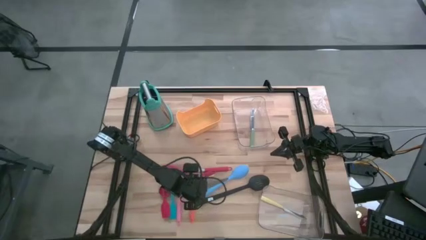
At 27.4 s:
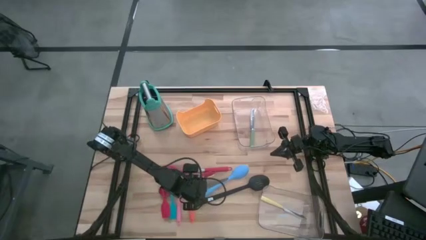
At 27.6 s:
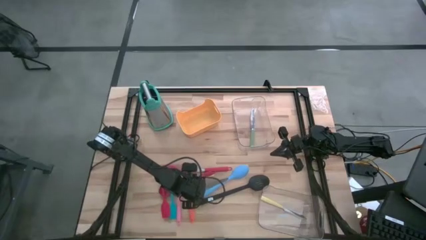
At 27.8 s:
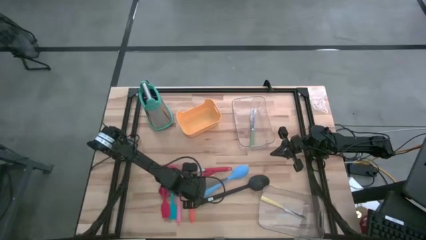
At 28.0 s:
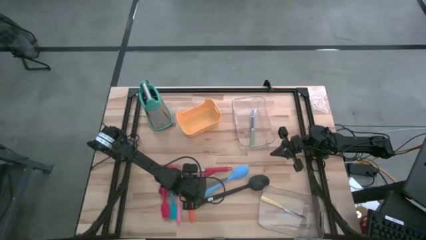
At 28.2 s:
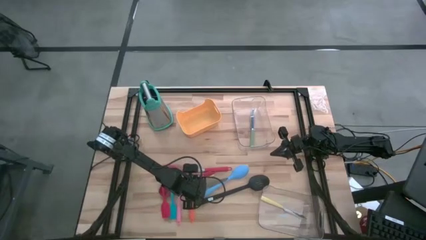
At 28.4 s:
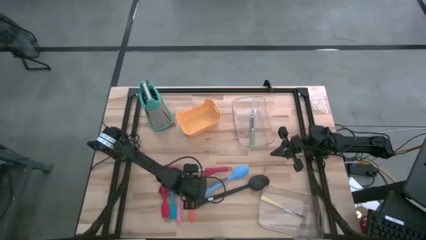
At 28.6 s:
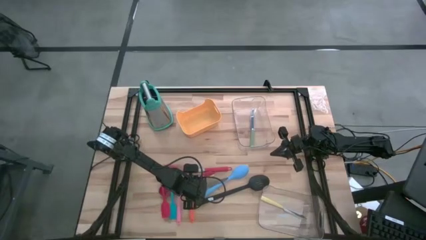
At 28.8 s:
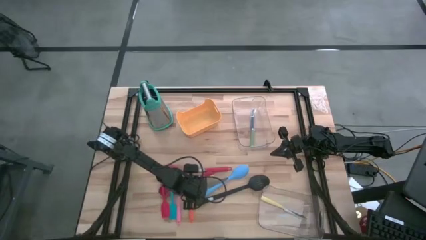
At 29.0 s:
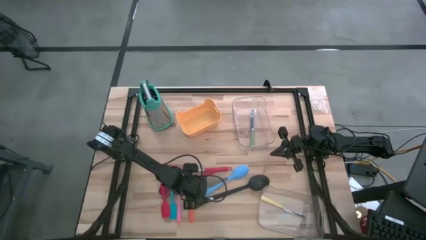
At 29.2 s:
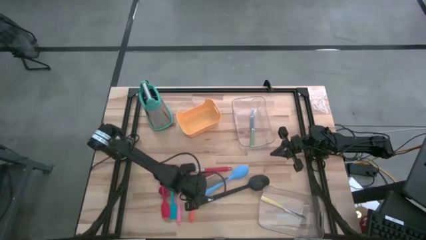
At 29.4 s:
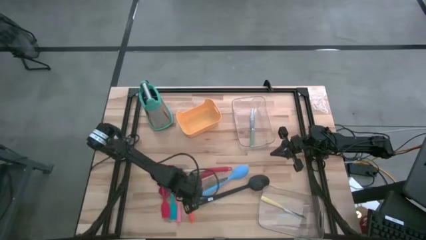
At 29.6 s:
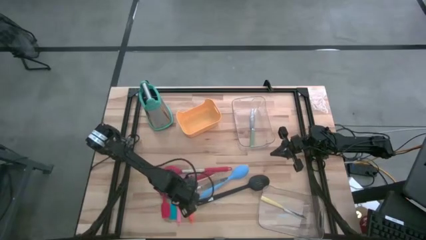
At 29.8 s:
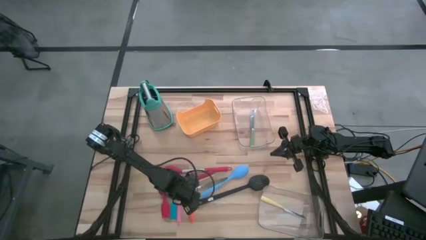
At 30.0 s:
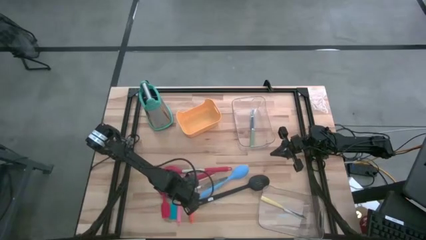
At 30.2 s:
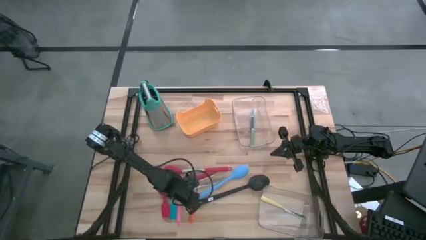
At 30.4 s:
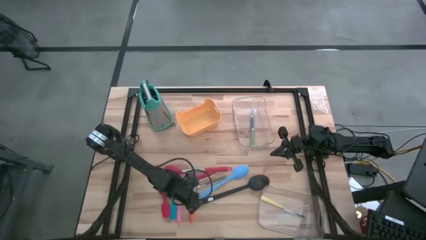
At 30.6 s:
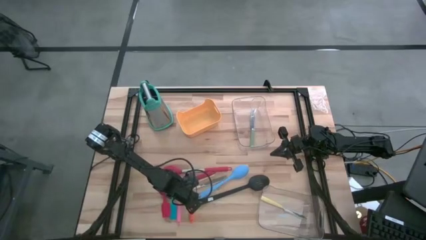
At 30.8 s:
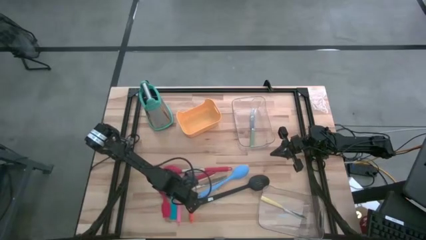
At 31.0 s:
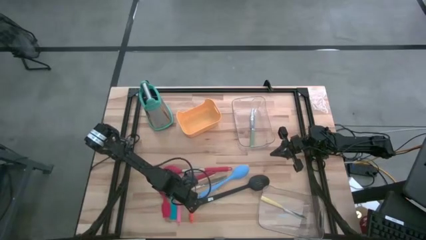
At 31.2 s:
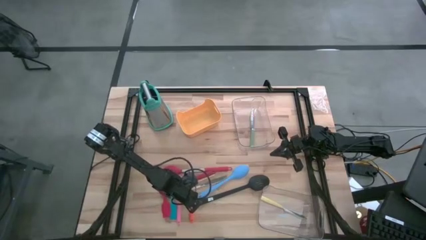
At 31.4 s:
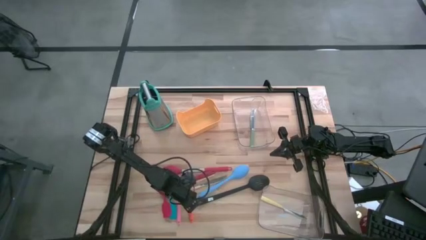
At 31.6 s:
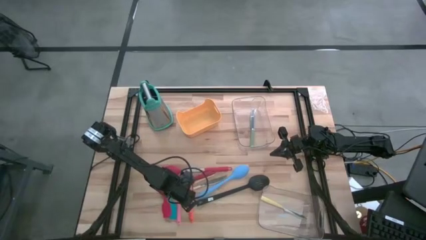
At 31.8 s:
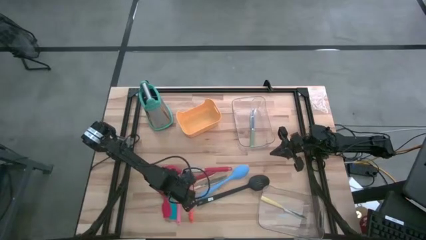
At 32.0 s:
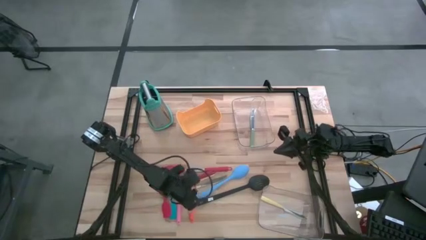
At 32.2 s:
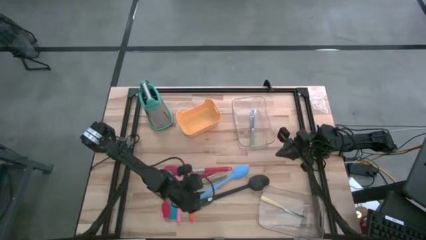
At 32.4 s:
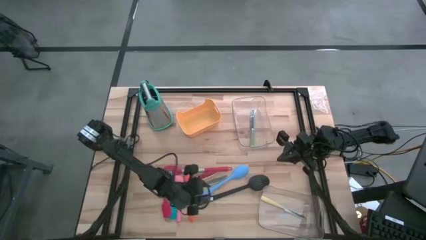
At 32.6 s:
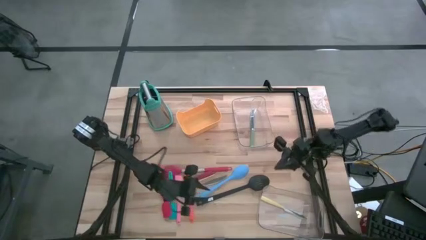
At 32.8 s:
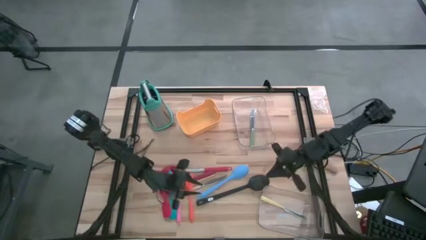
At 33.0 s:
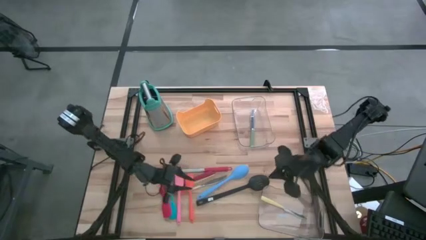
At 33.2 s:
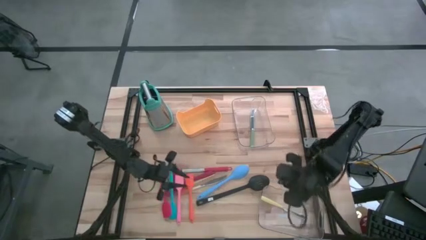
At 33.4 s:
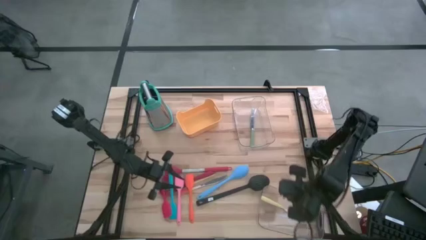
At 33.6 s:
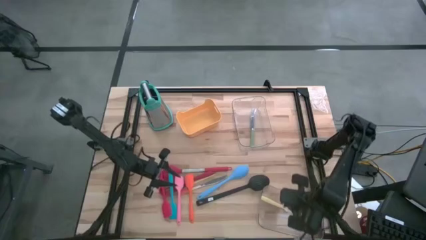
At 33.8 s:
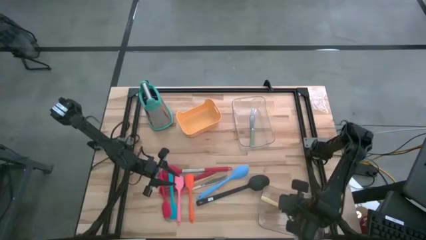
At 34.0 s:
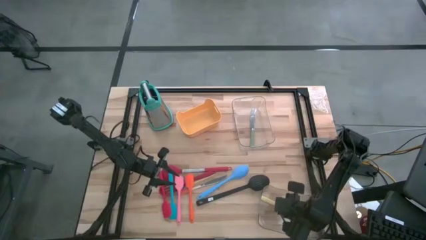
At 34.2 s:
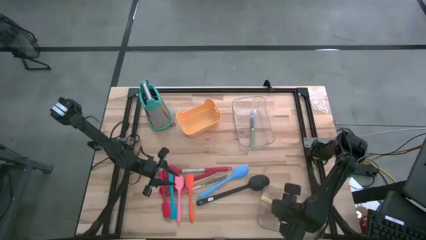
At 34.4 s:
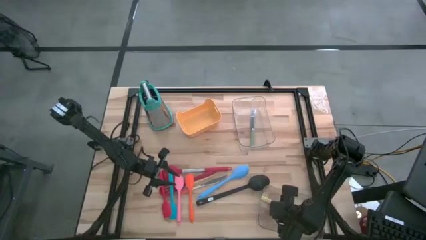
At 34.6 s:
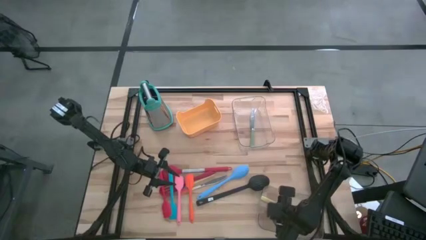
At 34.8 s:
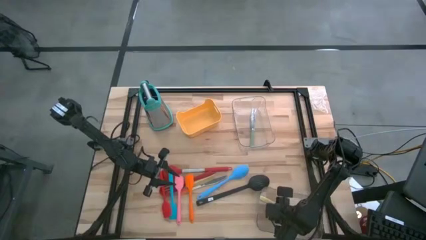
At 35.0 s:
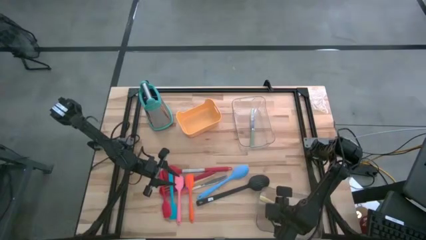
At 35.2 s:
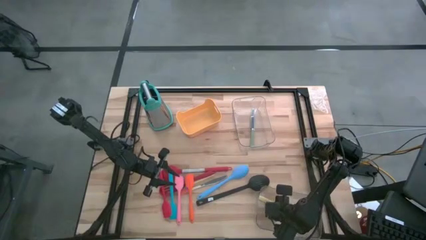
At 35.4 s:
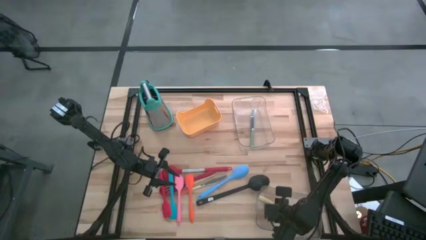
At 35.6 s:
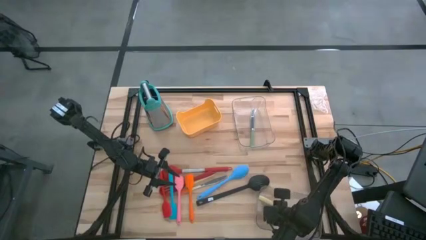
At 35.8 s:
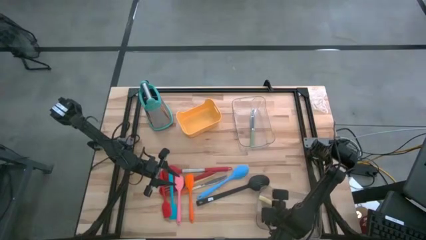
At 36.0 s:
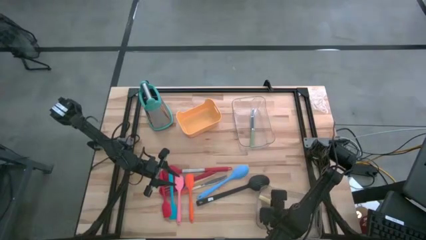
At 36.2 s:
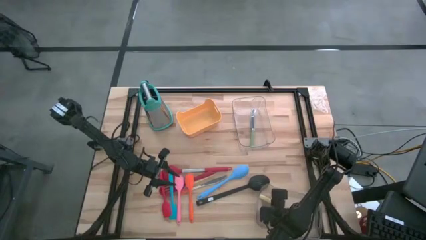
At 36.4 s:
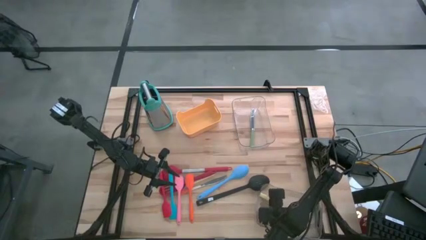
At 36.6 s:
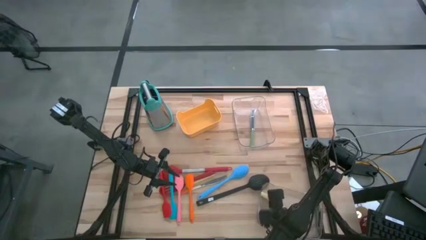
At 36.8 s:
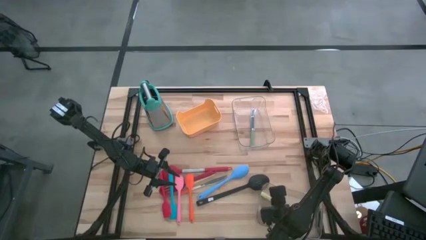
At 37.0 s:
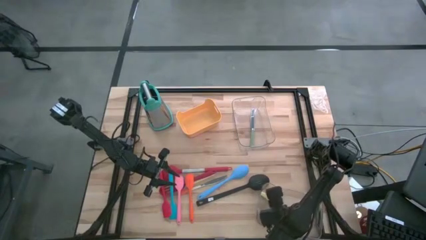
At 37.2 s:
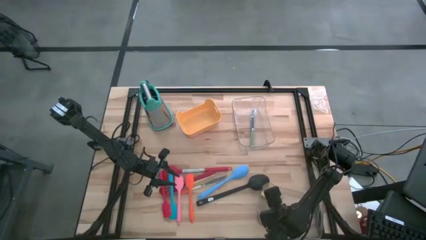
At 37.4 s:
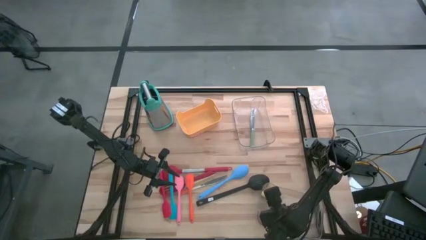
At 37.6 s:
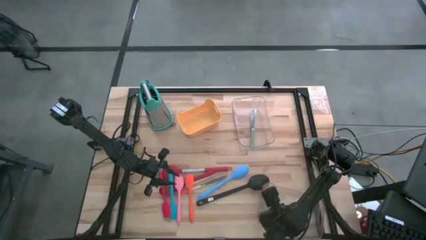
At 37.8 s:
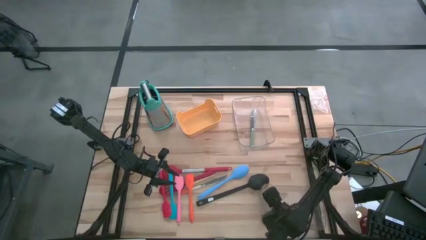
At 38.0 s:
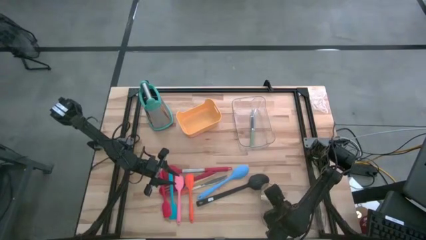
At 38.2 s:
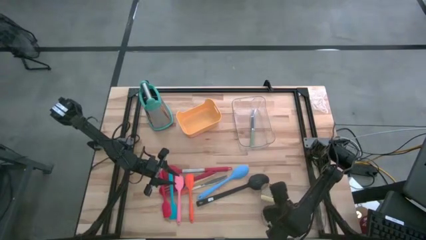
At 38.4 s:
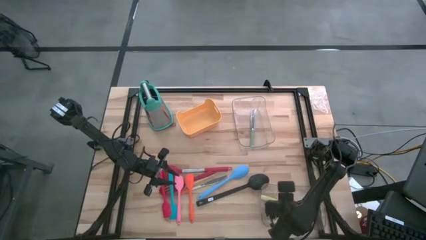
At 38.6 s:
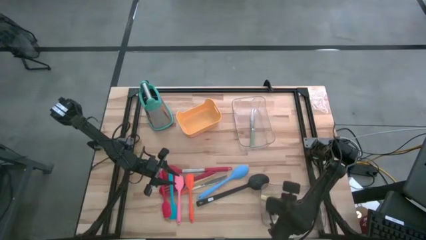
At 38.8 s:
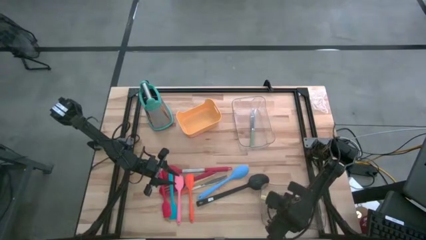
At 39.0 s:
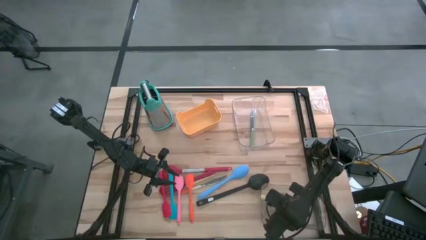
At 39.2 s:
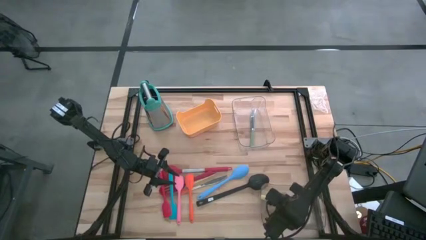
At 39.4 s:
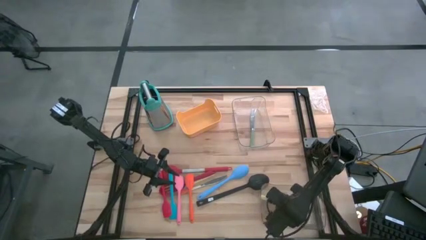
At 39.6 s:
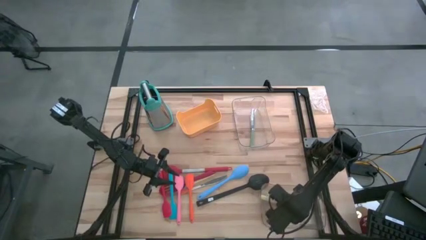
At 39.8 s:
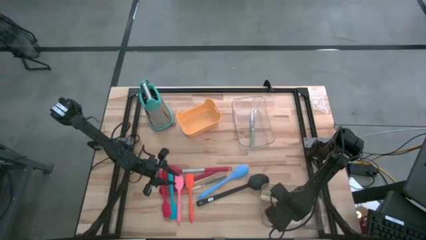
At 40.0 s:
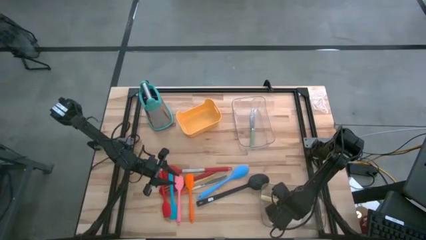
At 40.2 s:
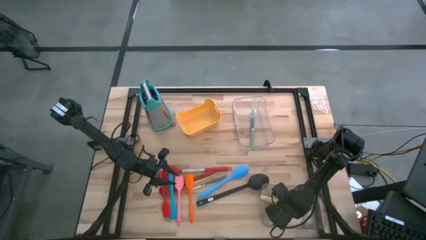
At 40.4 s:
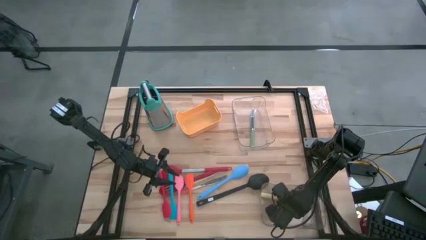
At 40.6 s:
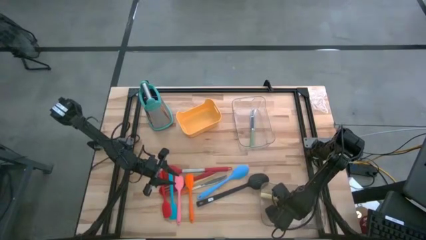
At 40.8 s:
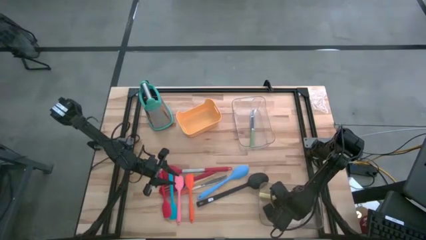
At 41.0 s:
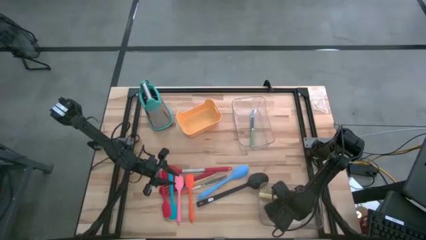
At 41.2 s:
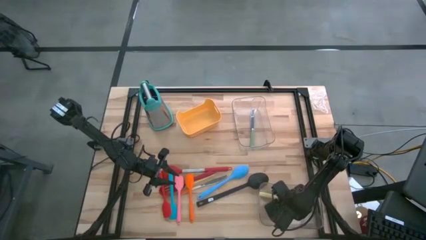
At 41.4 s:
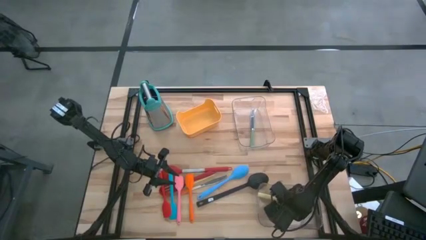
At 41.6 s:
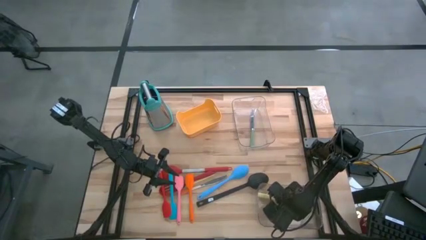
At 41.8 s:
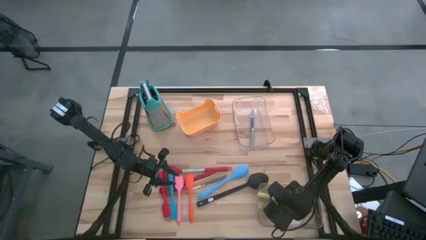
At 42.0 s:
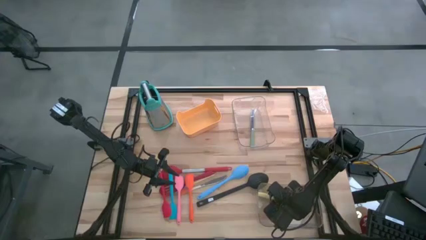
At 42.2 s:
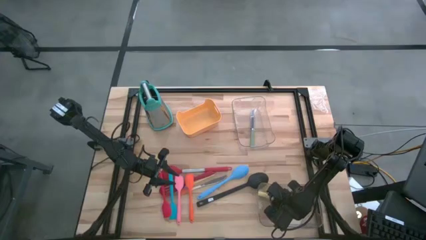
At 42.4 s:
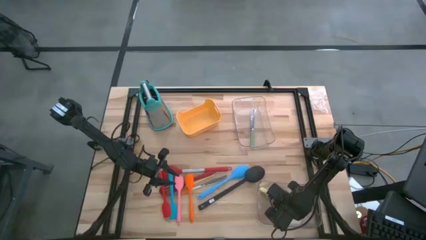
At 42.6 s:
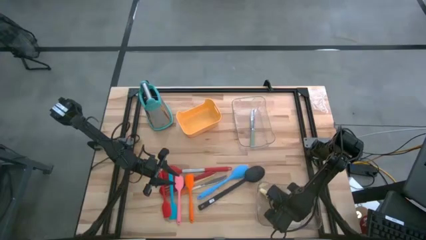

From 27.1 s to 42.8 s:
Task: Pick & Place Kitchen Items
Put the right yellow kitchen knife into the top transparent bin
